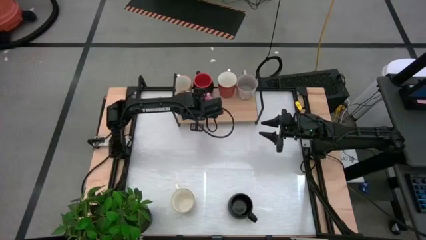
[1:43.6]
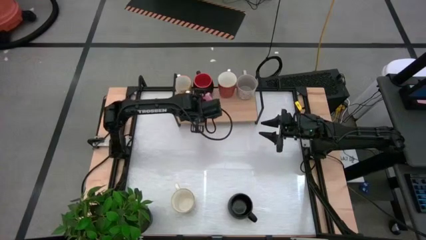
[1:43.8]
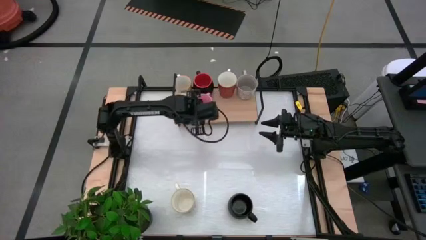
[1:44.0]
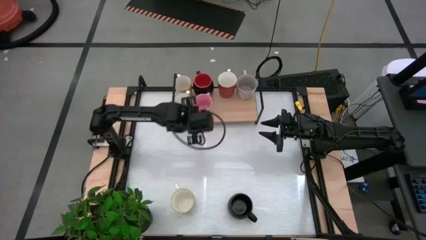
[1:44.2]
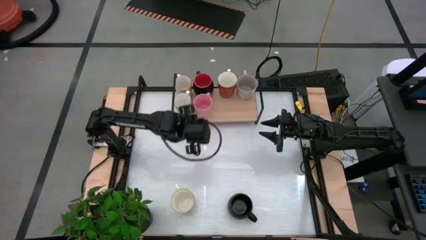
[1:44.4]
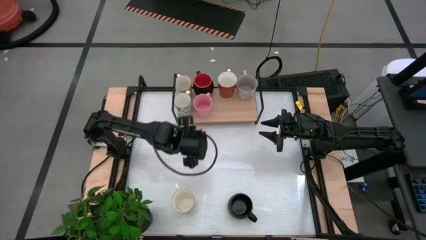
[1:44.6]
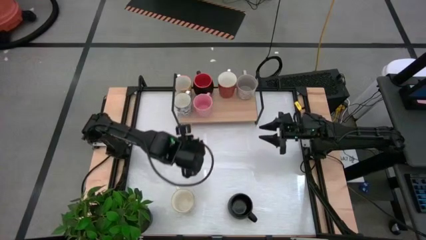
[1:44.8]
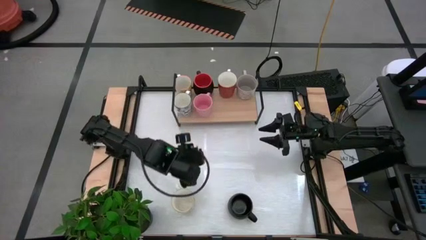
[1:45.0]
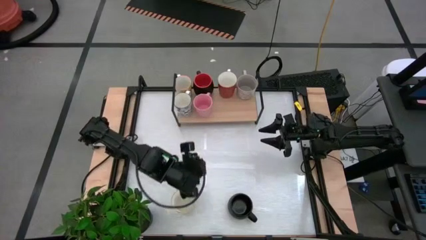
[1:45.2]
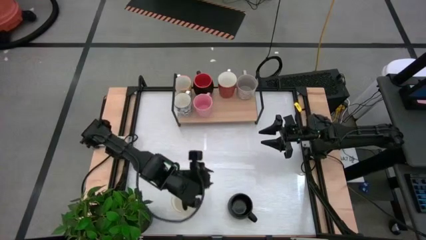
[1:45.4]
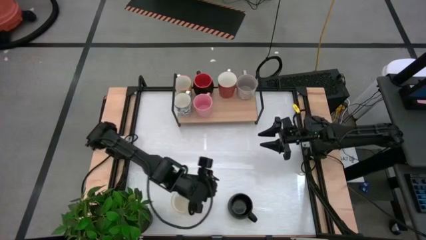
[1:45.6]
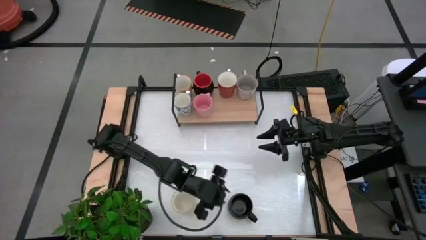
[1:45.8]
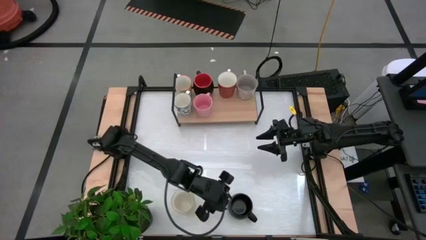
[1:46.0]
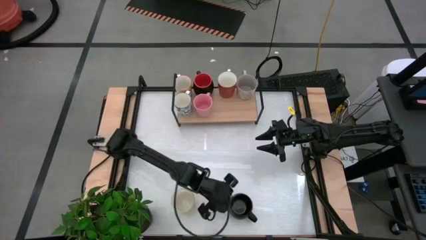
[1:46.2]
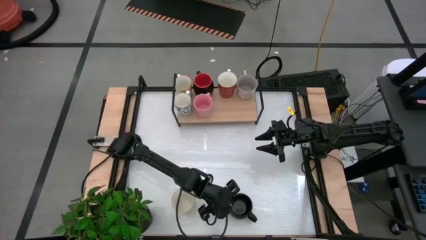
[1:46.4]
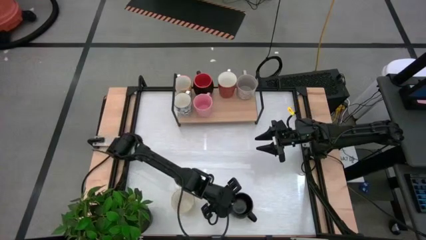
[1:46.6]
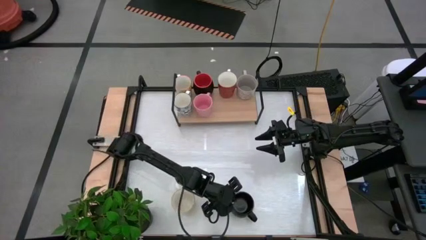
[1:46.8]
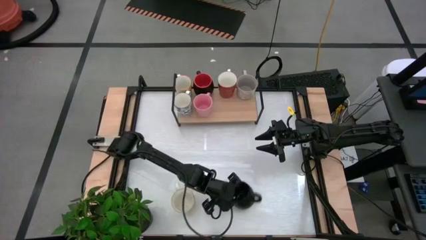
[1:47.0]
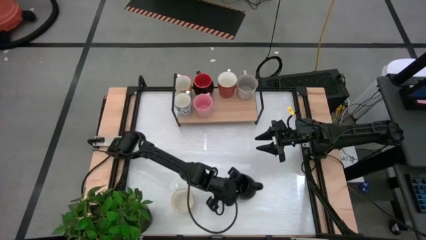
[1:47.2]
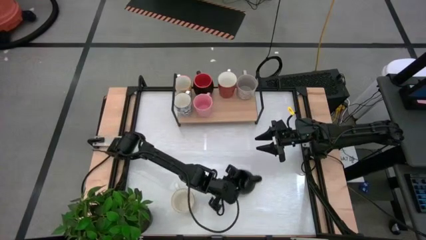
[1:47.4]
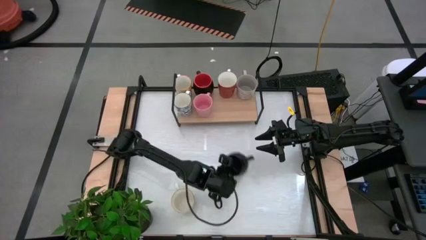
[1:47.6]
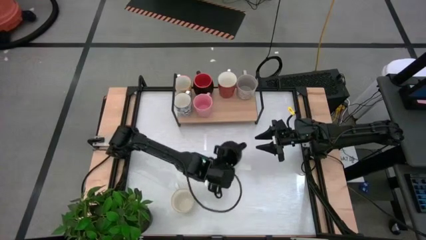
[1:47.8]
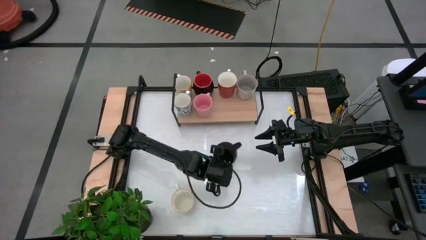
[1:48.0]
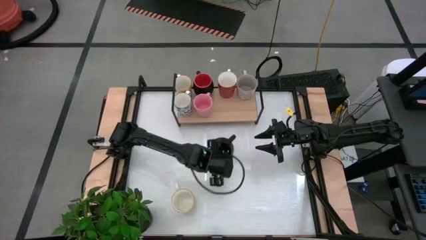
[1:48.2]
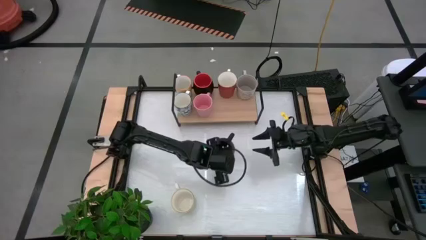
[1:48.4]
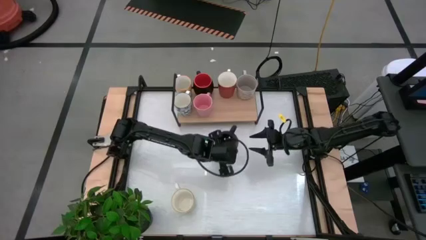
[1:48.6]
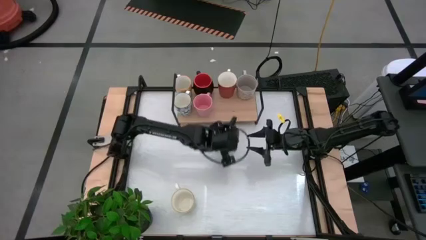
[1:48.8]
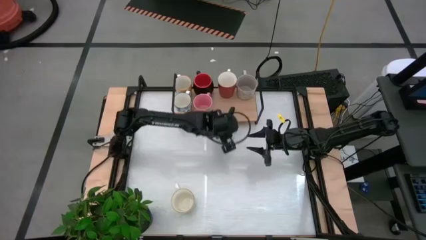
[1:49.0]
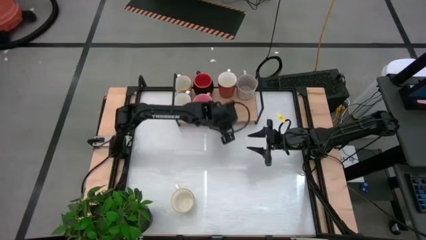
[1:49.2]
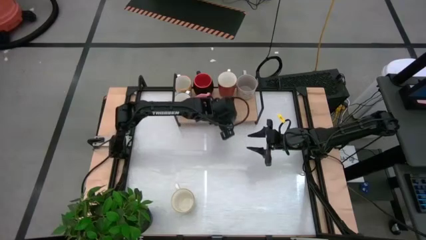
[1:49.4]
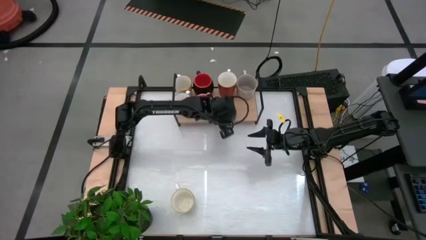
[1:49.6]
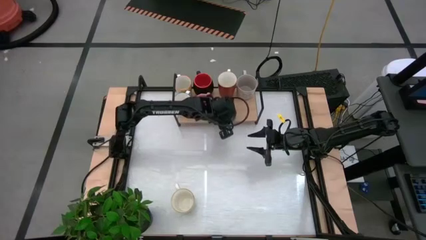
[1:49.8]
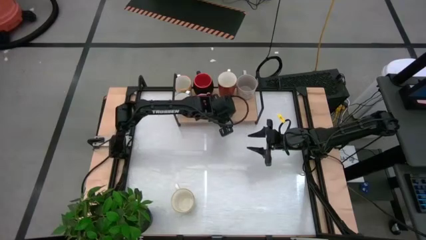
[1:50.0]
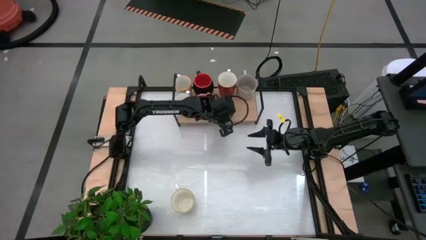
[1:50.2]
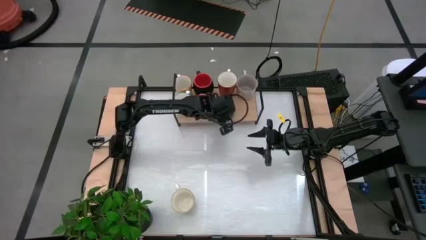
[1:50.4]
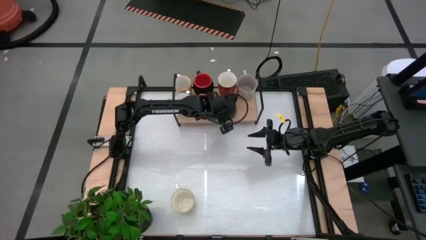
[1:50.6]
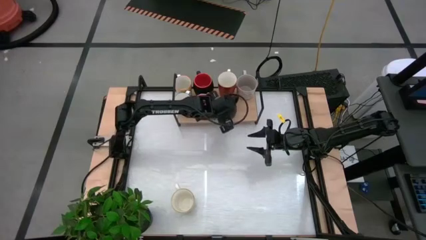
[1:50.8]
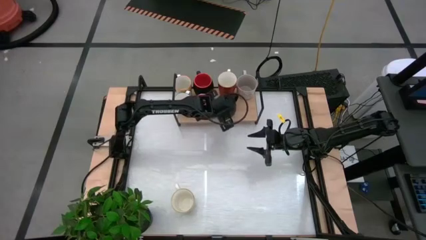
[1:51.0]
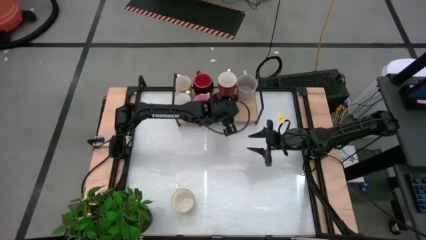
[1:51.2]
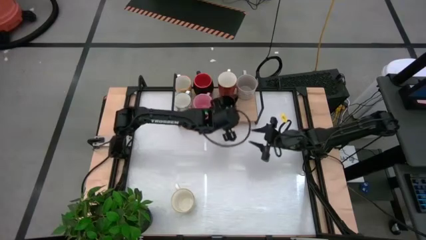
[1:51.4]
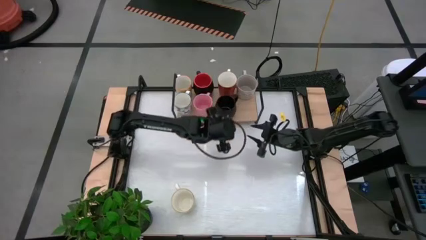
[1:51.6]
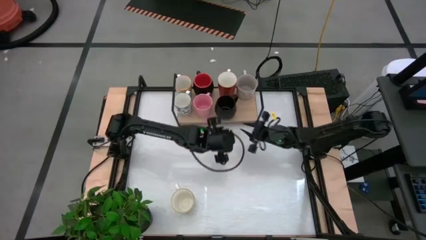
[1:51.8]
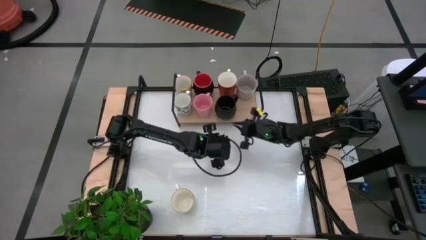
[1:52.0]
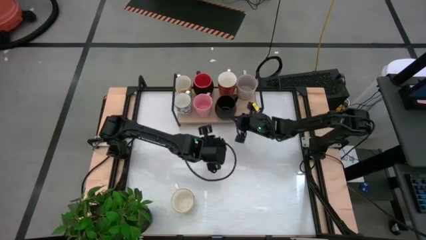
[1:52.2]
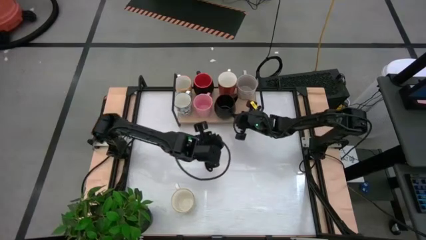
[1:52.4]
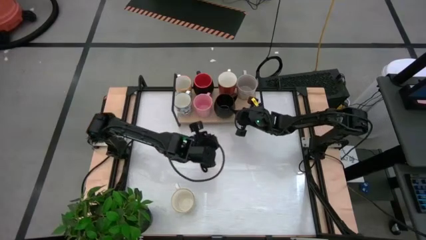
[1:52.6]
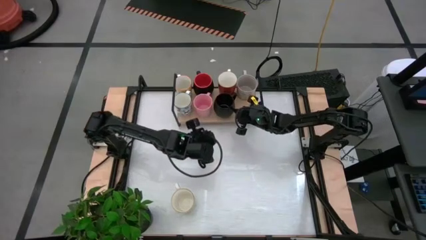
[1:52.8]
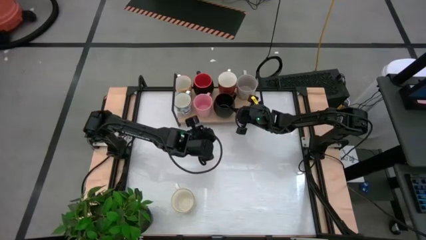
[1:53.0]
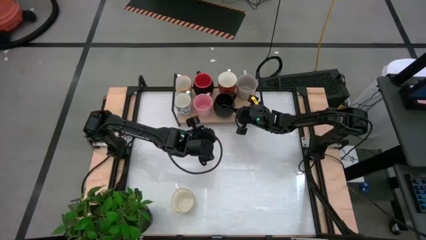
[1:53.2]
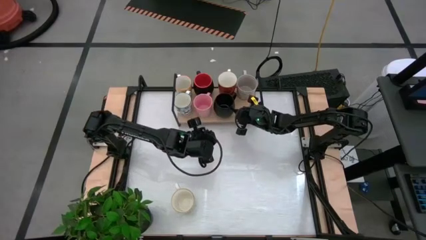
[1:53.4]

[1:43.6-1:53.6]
Task: Place coffee mugs
Put the black mug on the shelf

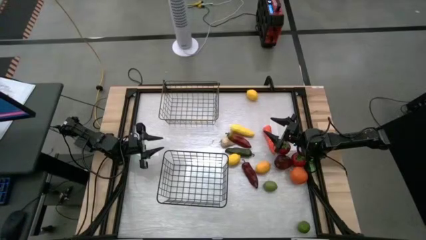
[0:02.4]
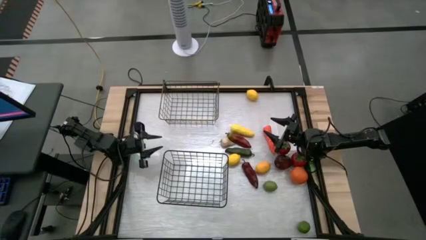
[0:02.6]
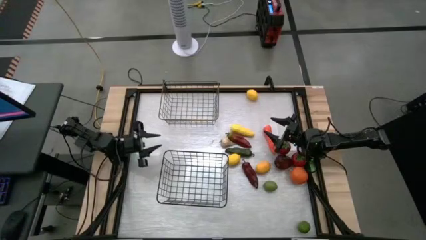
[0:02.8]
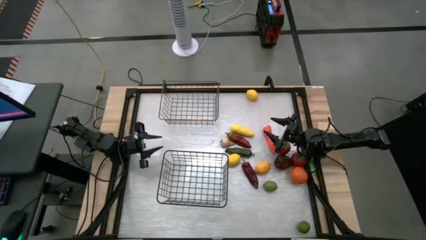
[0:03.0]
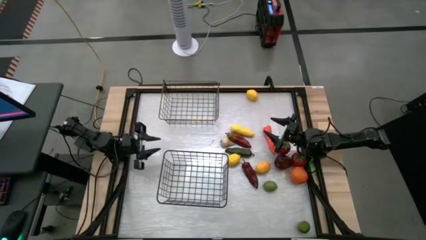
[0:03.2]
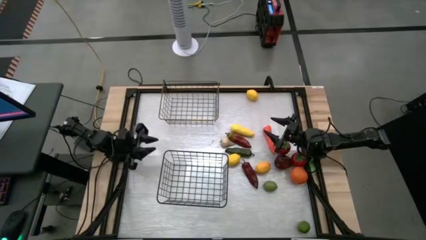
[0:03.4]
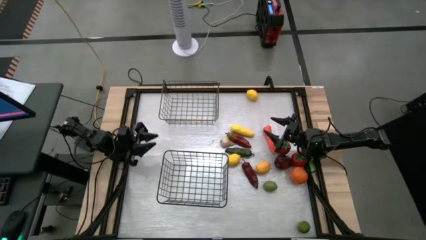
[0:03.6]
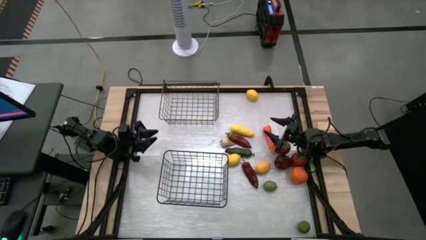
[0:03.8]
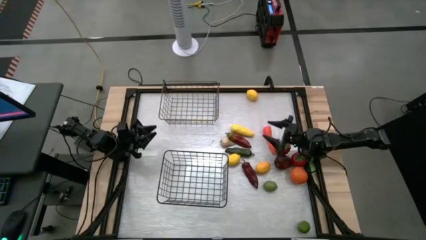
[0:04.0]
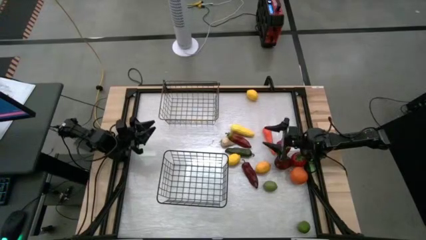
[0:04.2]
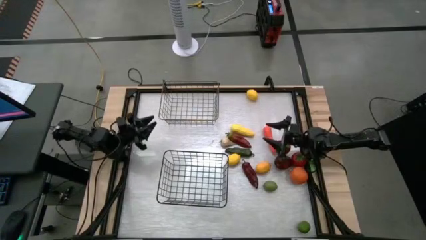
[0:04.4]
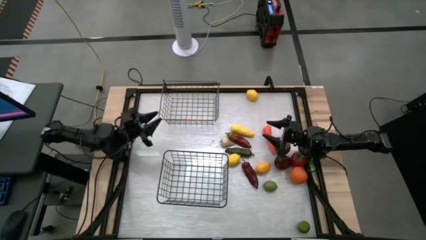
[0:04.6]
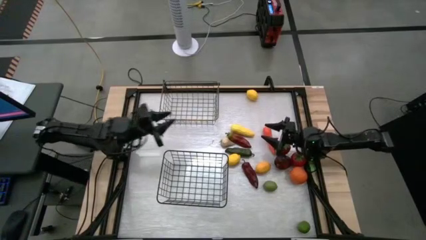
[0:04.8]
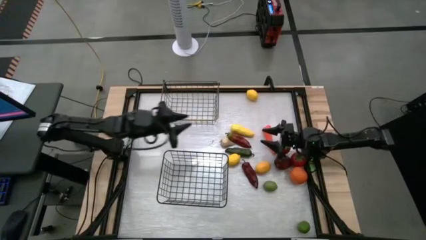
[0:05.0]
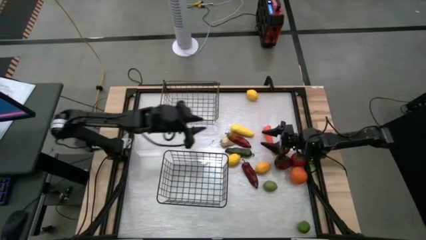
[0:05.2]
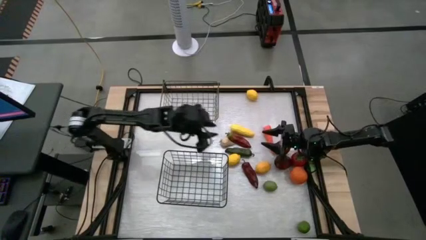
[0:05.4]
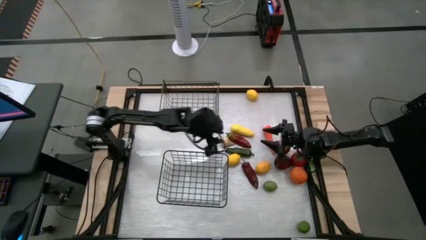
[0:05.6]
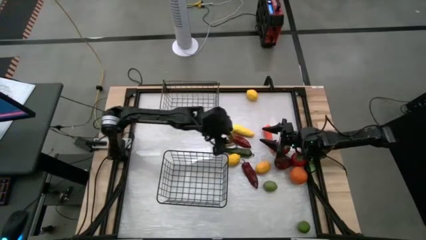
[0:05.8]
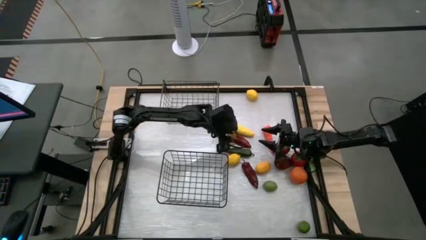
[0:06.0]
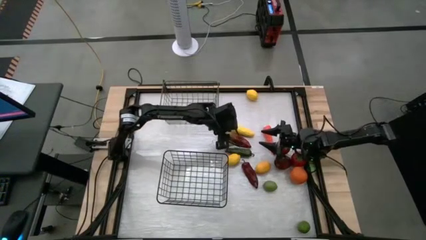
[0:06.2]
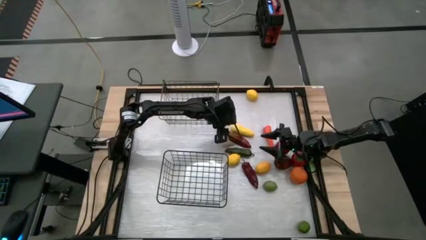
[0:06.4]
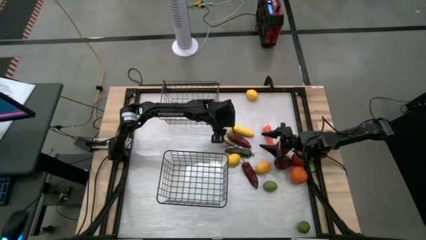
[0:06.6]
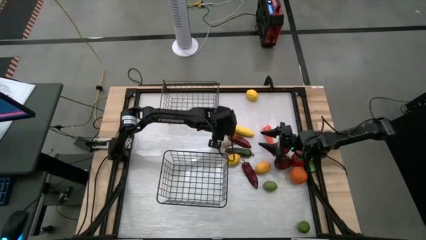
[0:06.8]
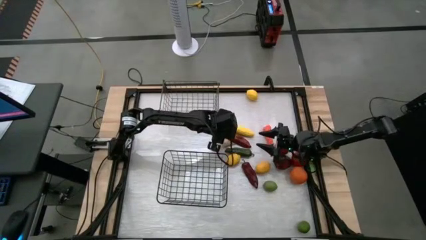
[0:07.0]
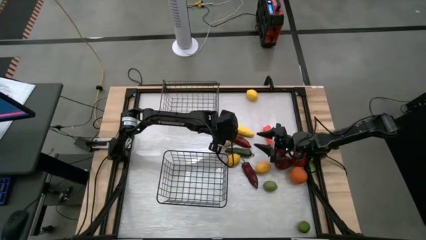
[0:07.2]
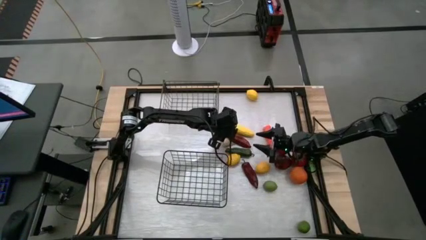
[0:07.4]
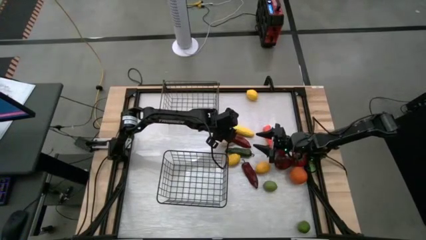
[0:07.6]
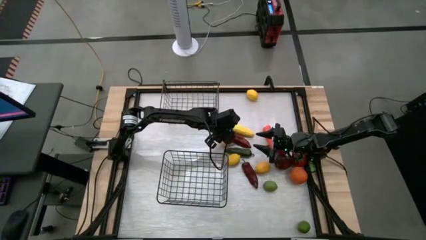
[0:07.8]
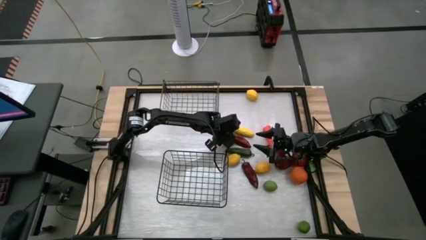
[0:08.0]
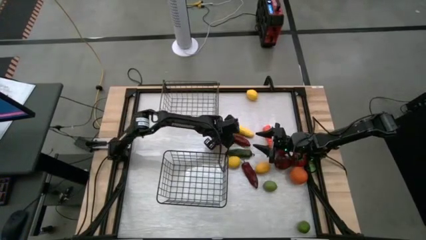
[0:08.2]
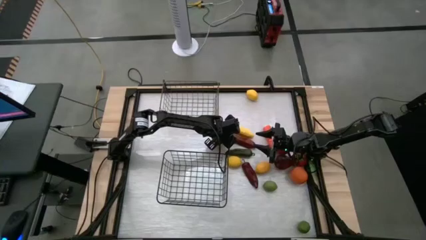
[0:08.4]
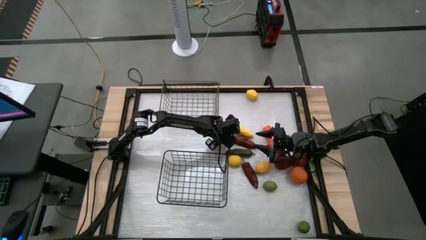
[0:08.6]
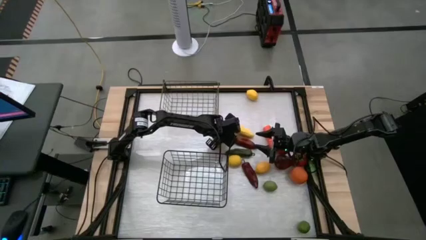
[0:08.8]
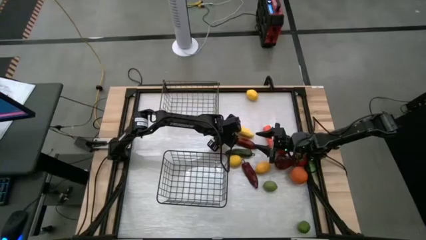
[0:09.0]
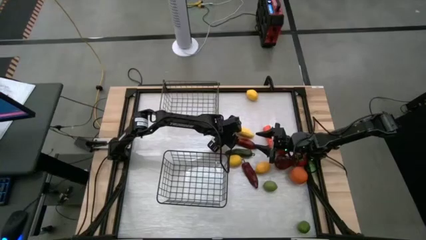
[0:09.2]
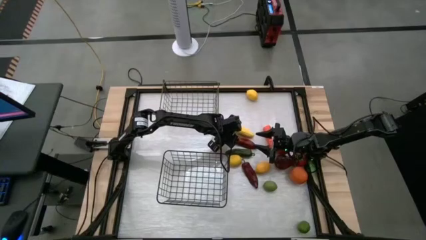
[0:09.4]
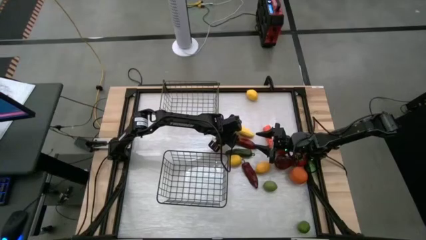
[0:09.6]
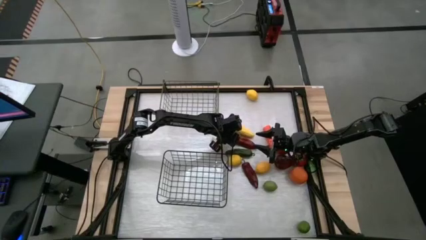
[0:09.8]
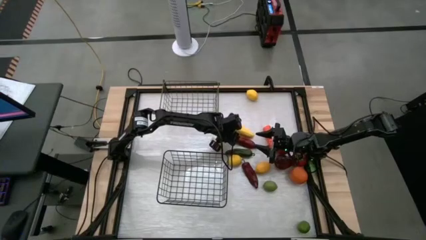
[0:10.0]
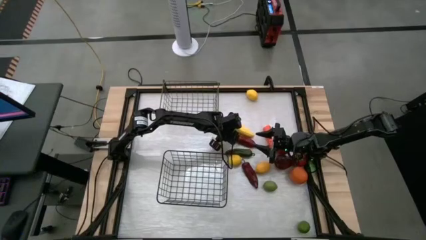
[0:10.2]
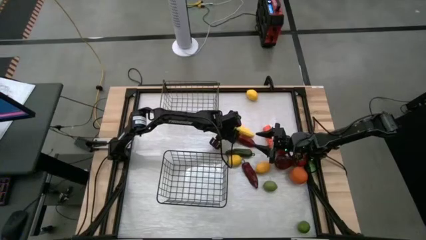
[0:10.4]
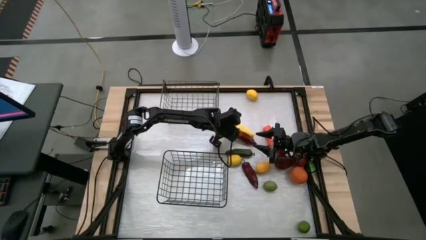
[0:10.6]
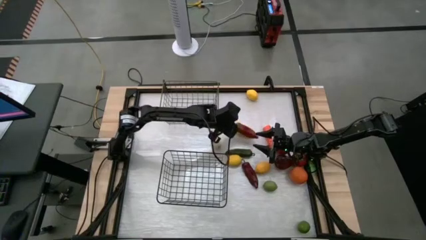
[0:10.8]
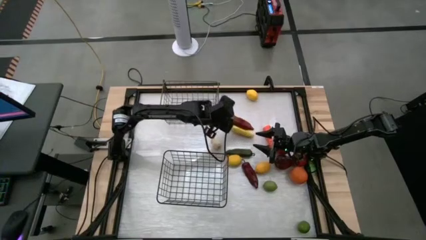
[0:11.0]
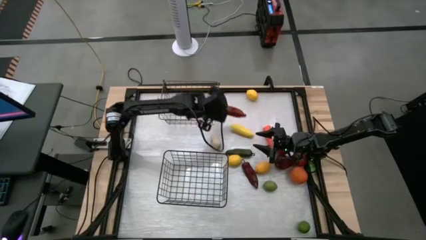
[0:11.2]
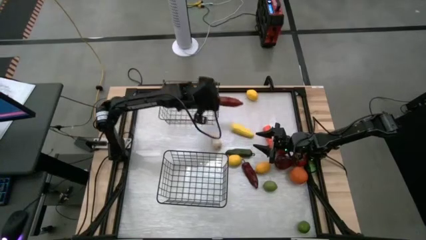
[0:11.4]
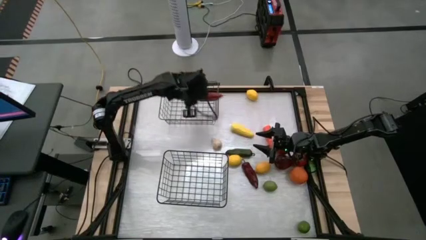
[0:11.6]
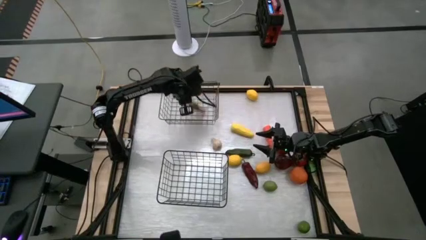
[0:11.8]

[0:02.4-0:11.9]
Task: Sort produce into baskets
Put the red chili pepper into the top wire basket
